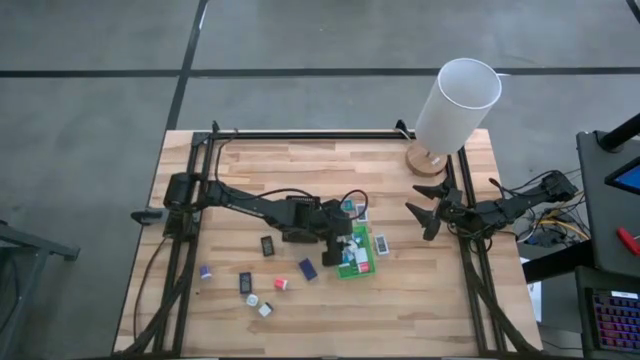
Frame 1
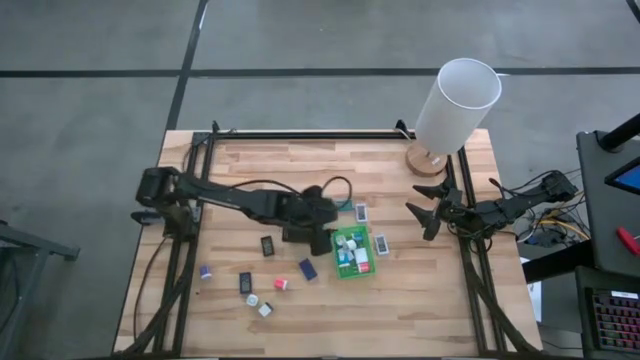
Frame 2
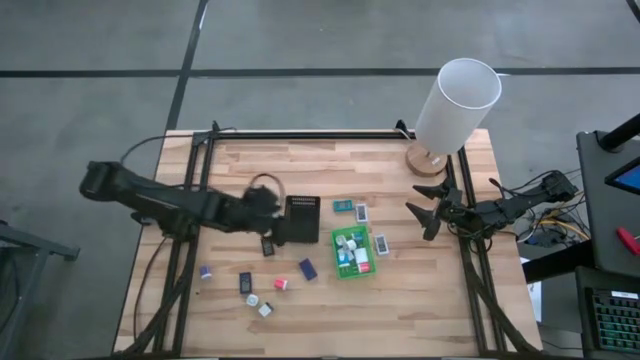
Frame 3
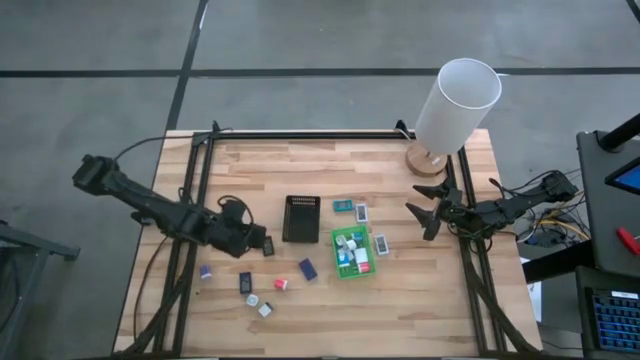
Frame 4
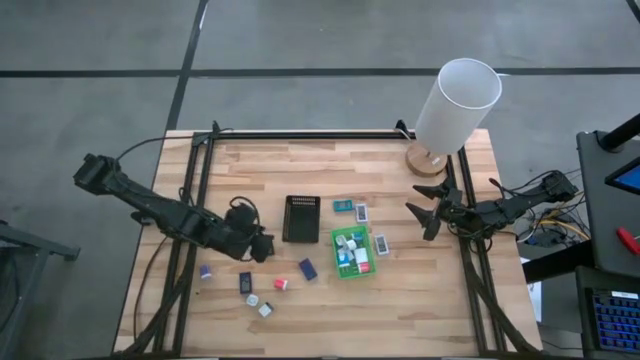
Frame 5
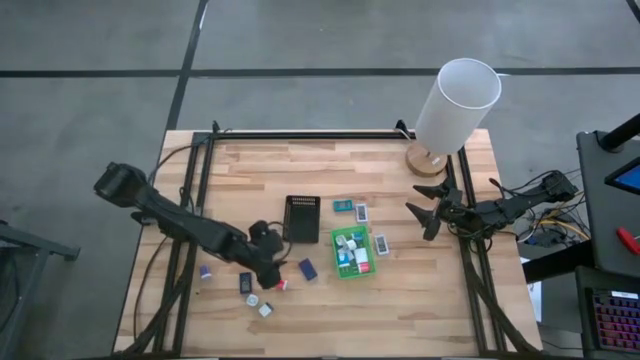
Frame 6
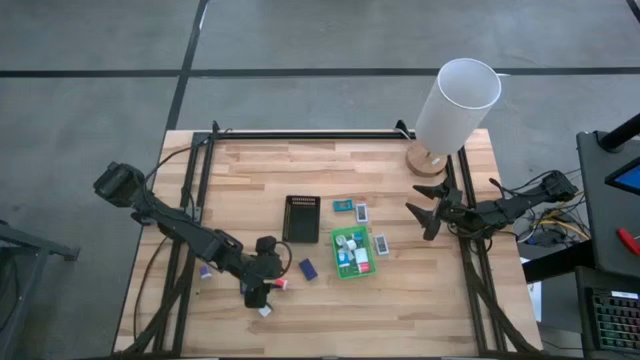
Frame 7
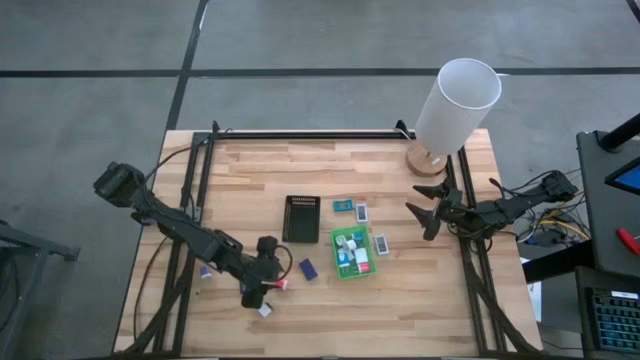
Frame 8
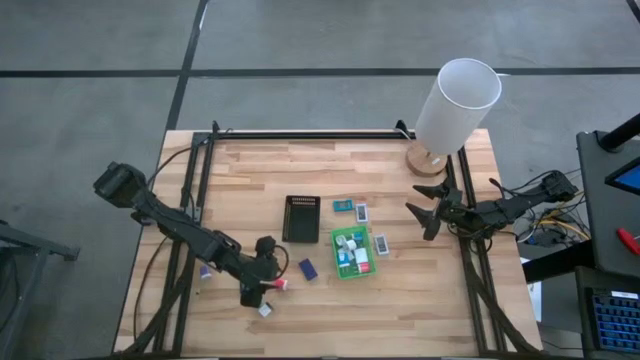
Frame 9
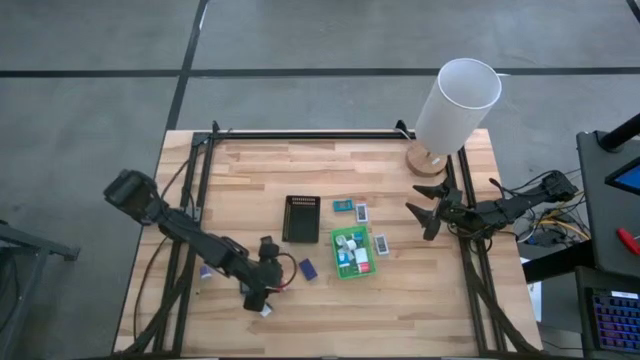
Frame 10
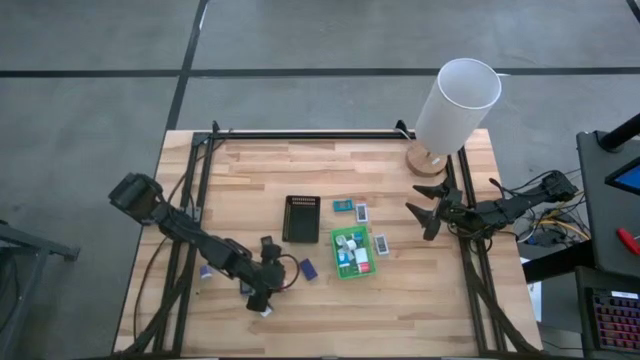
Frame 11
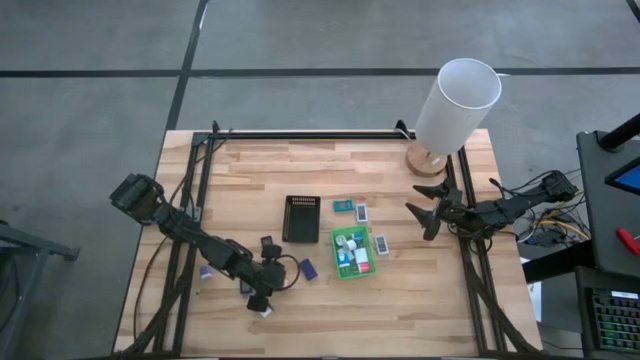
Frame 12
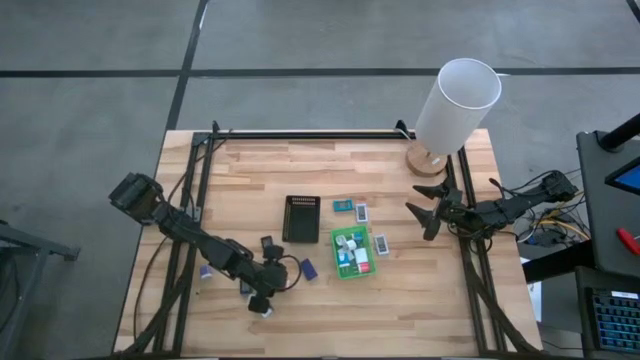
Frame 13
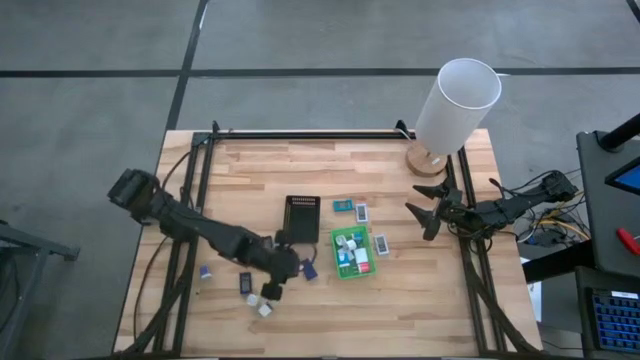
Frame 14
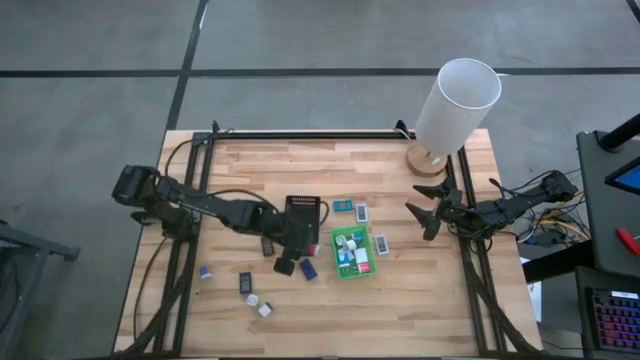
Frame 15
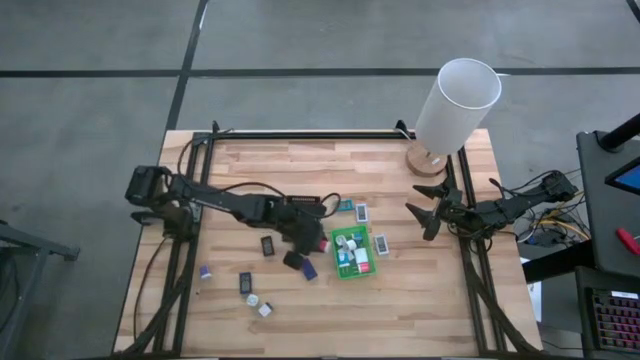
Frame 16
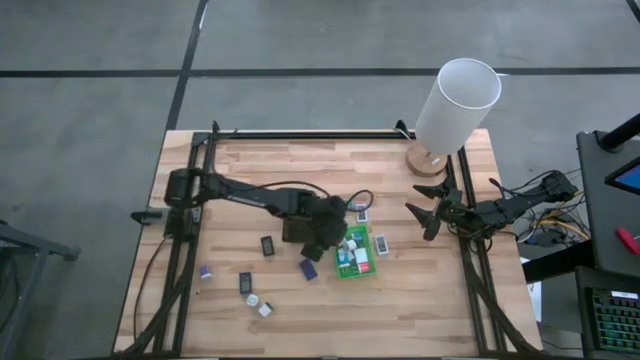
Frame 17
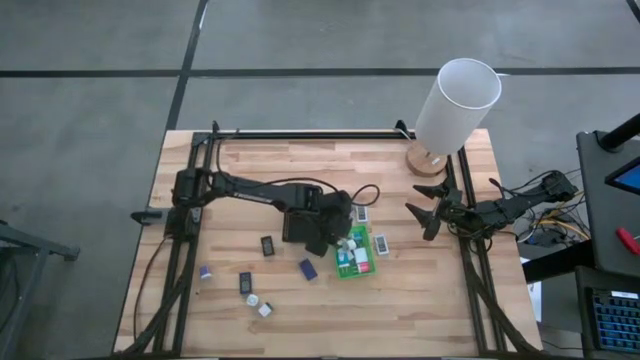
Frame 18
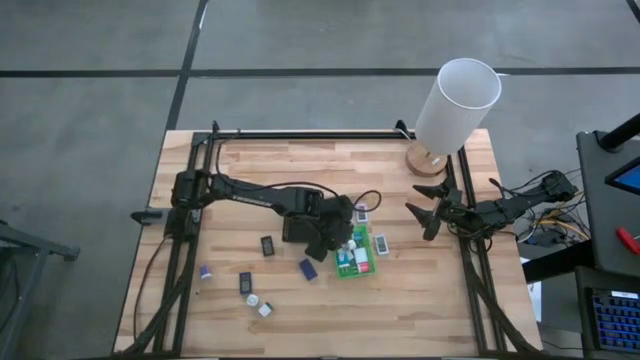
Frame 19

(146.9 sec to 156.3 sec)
Task: Pick & Place Office items
Put the pink charger adapter into the green bin

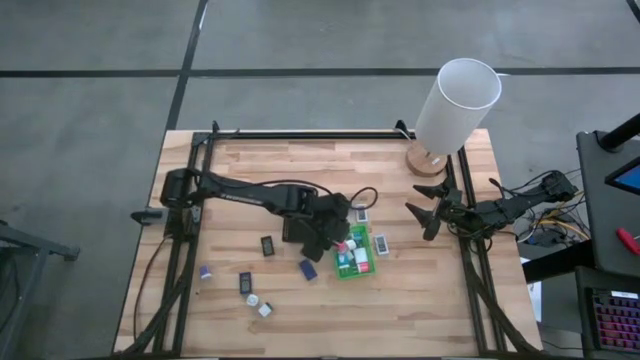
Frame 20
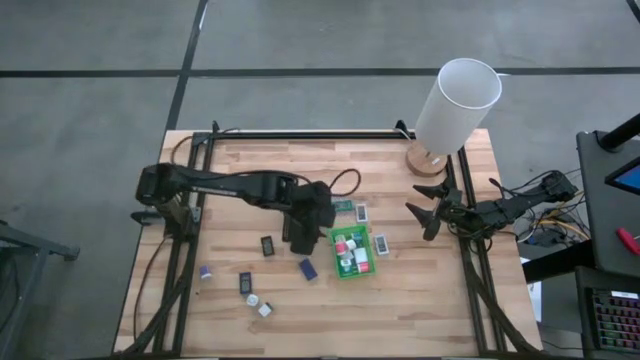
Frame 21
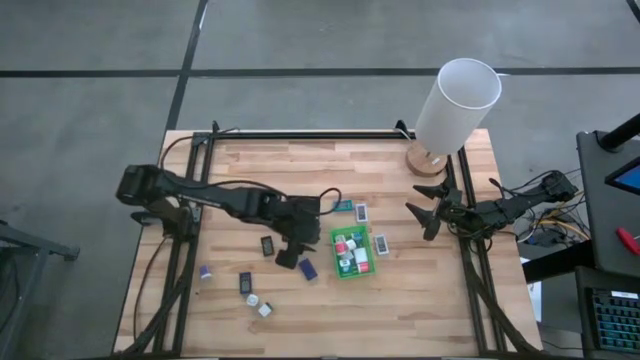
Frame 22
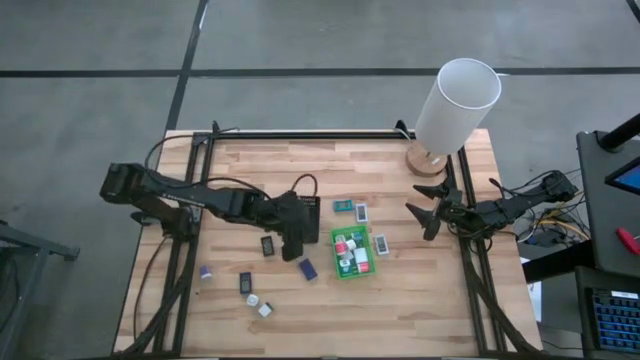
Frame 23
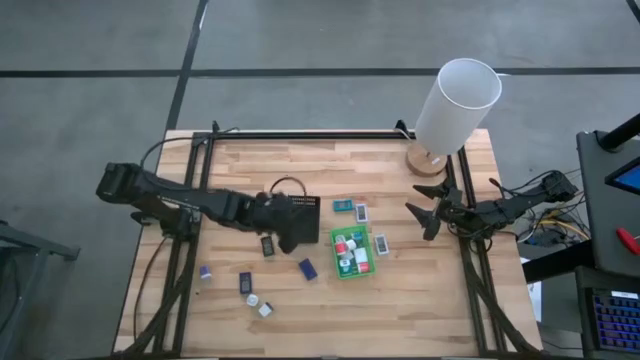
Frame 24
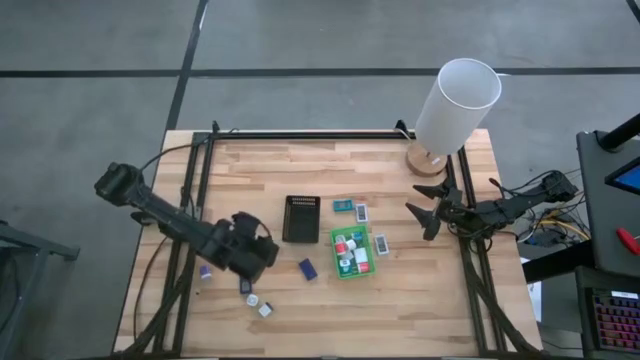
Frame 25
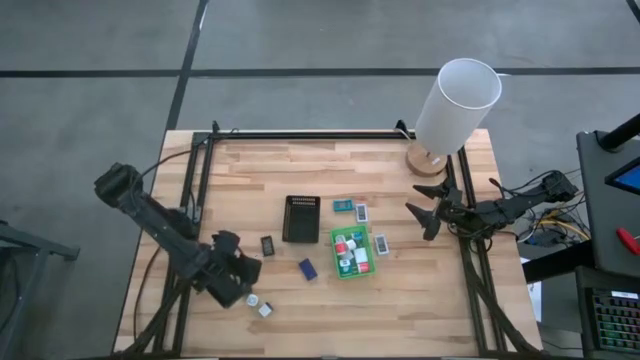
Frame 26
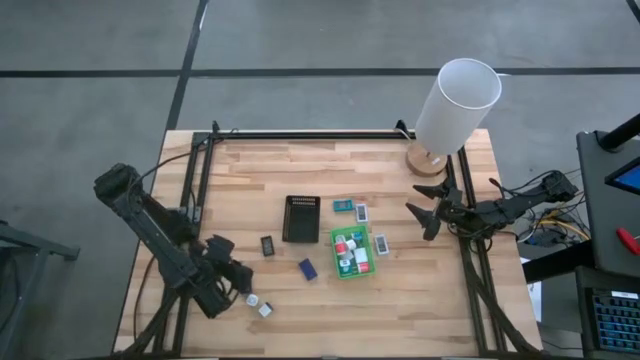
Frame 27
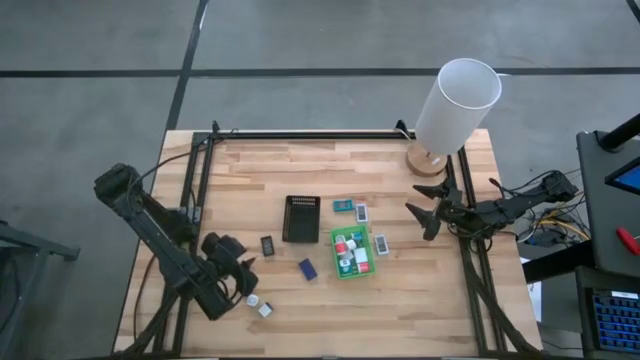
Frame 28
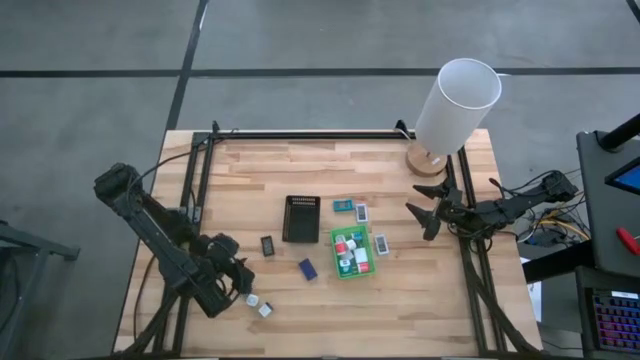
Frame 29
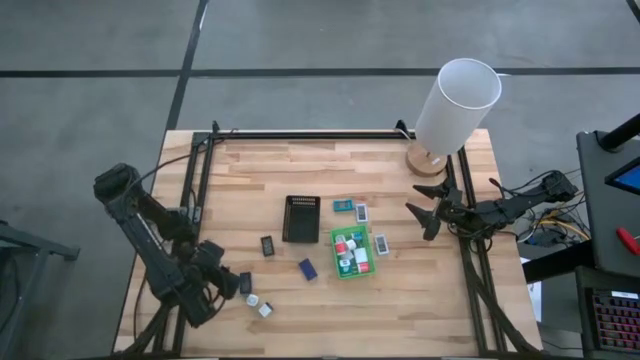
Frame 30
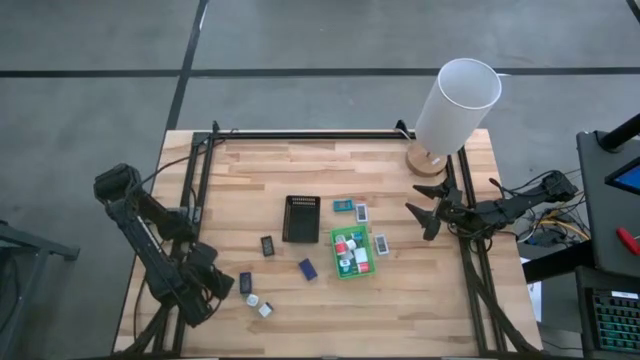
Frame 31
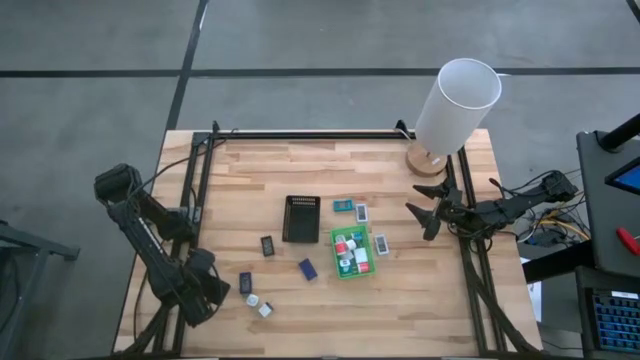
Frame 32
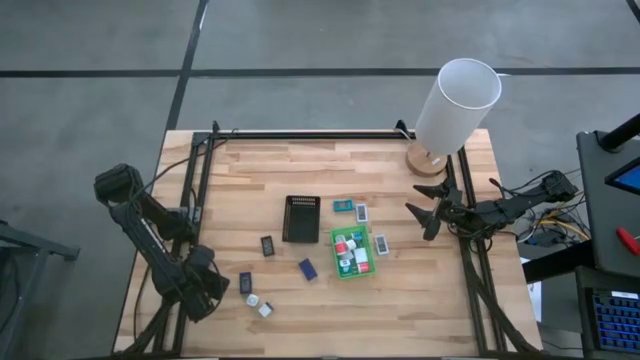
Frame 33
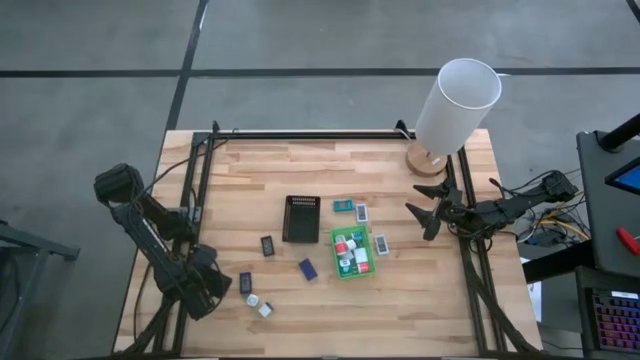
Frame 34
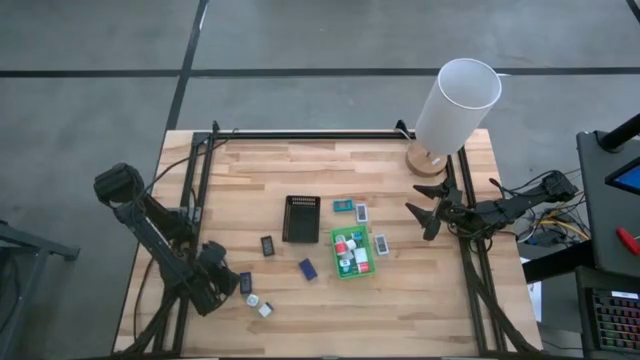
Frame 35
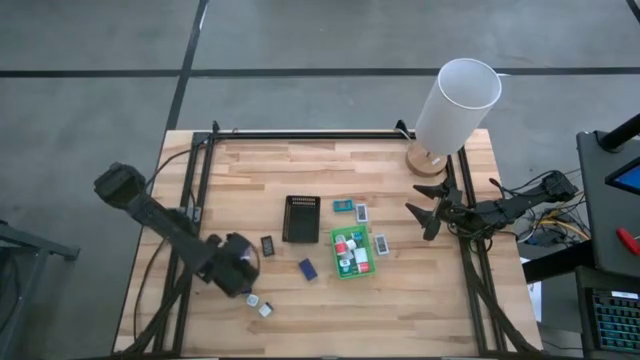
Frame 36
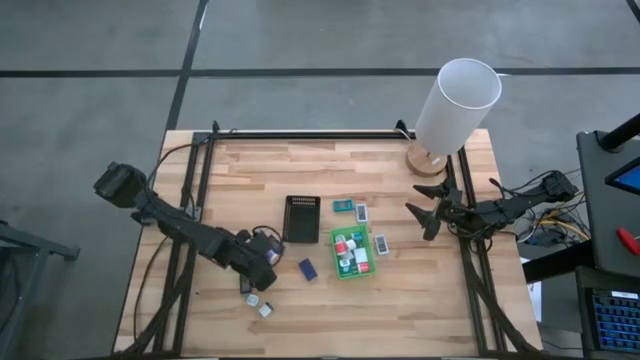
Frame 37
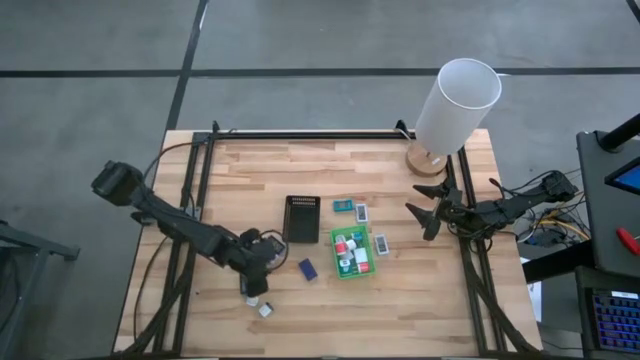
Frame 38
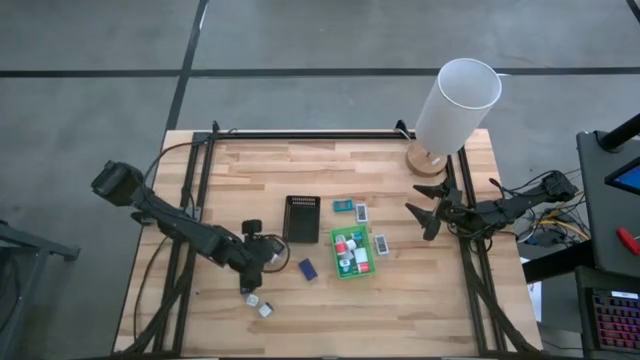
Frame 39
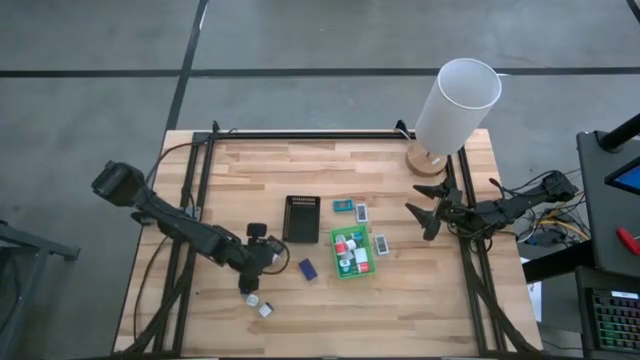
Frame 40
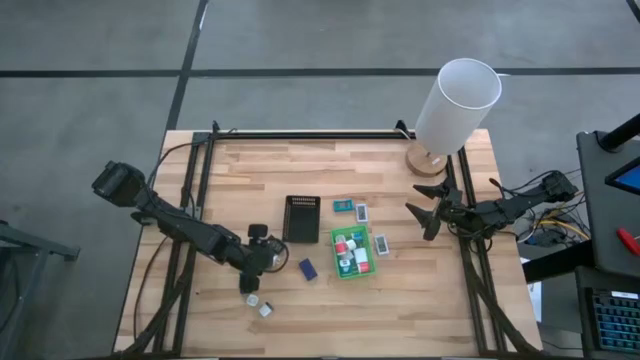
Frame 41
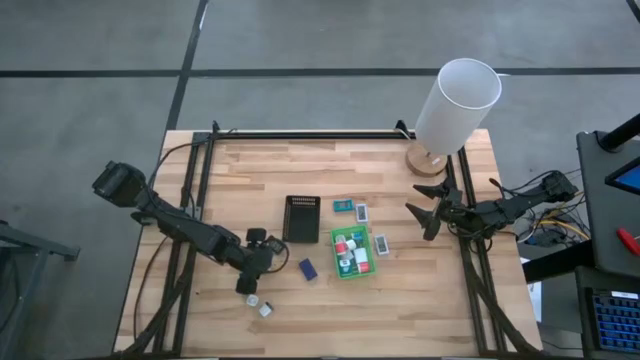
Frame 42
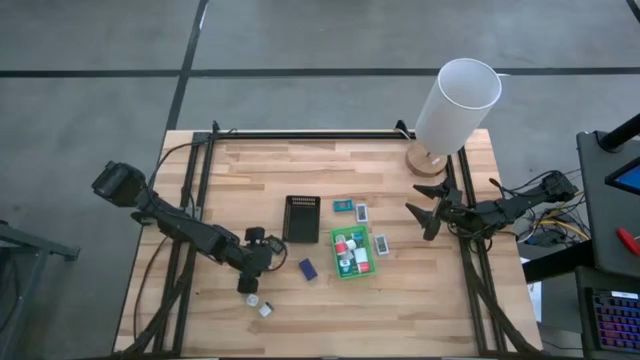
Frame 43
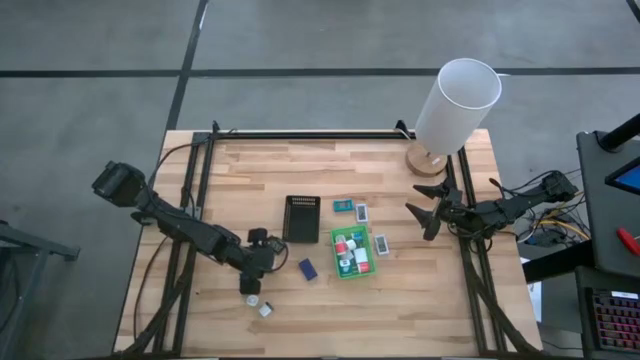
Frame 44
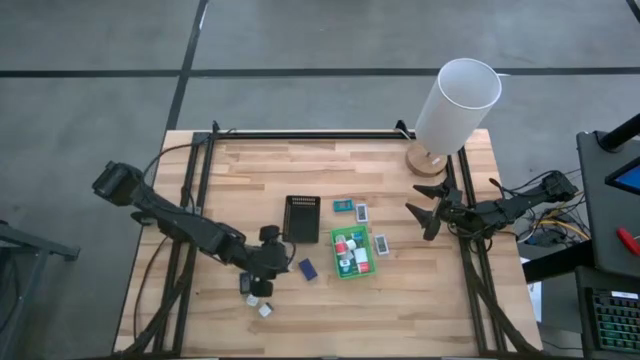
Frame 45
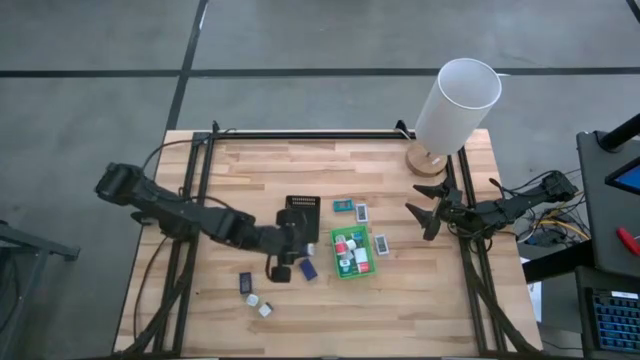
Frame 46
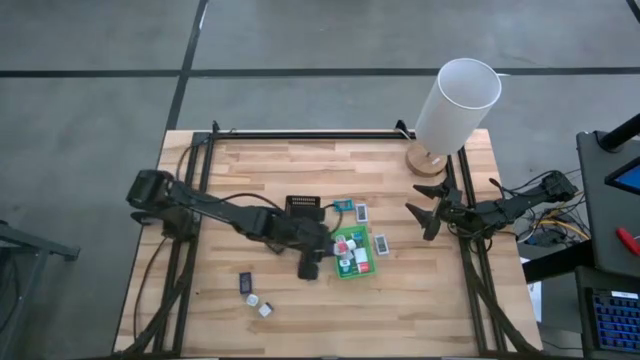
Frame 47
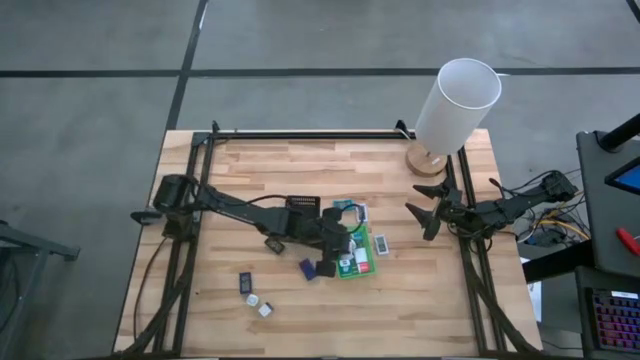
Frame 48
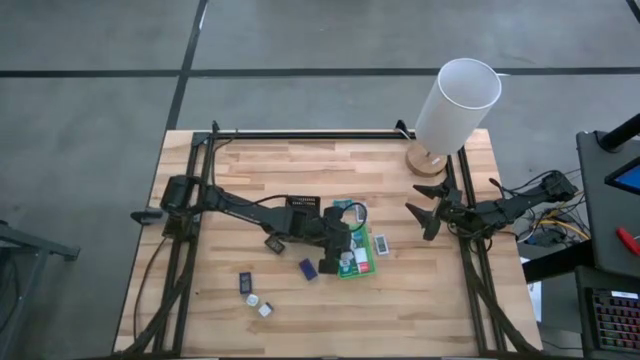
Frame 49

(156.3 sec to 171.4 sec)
Put the violet charger adapter into the green bin
